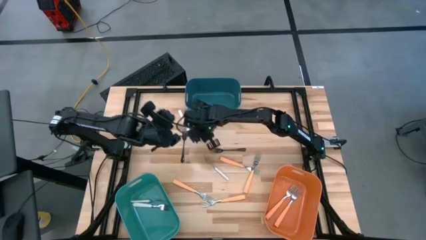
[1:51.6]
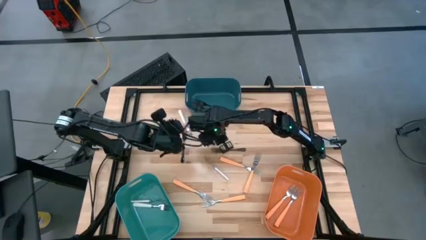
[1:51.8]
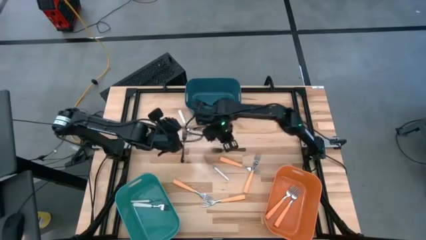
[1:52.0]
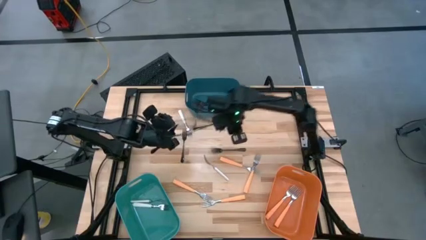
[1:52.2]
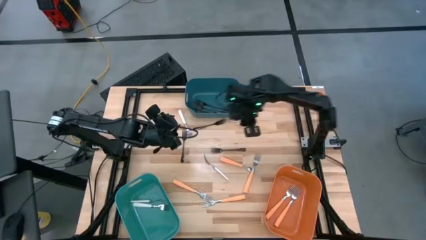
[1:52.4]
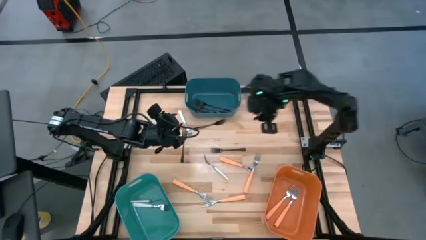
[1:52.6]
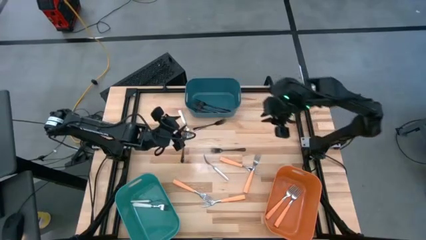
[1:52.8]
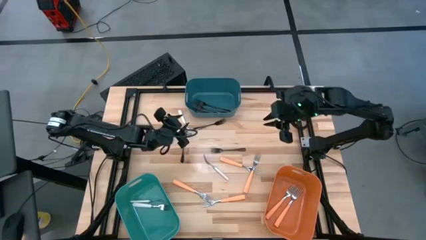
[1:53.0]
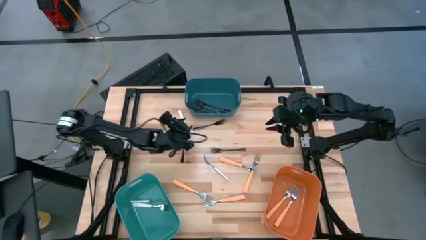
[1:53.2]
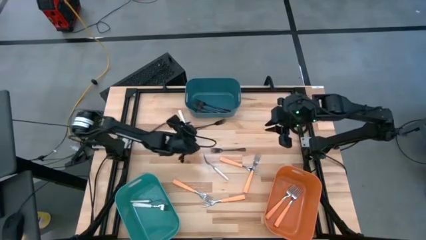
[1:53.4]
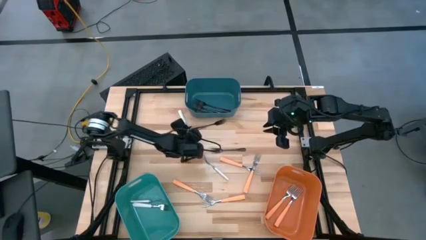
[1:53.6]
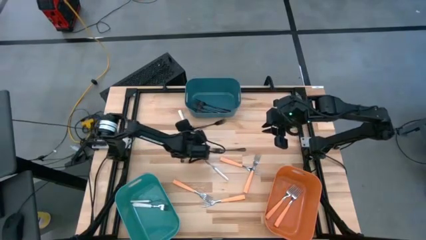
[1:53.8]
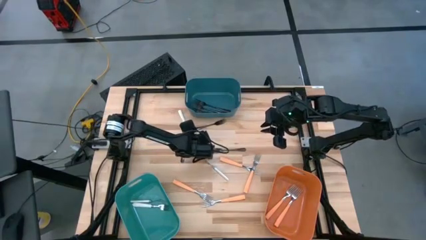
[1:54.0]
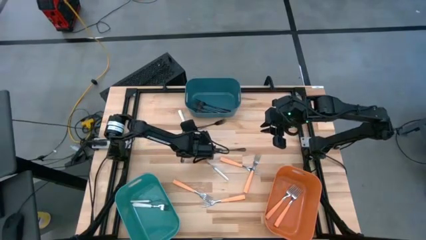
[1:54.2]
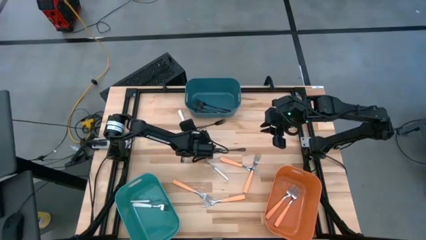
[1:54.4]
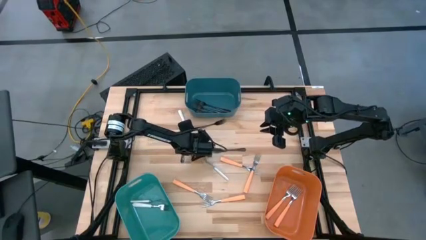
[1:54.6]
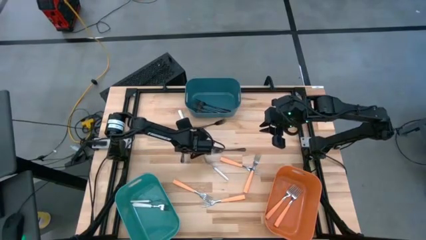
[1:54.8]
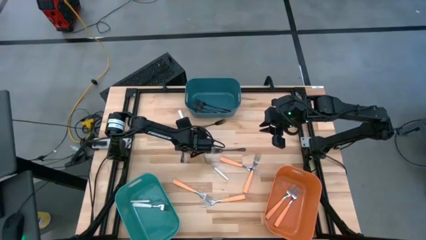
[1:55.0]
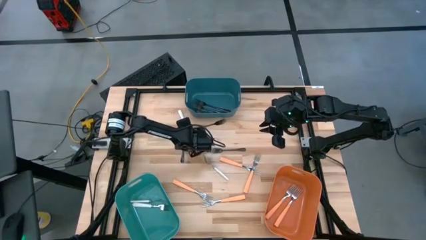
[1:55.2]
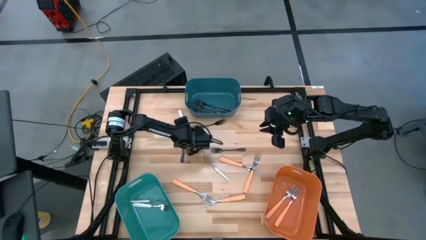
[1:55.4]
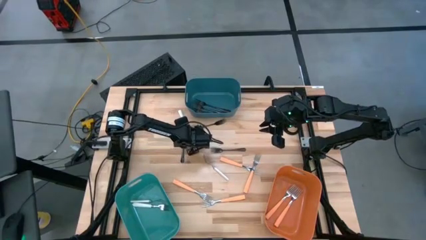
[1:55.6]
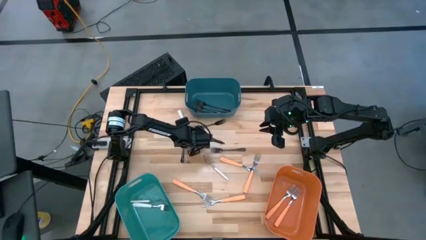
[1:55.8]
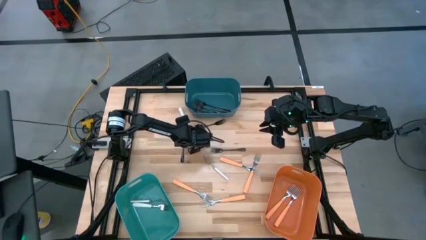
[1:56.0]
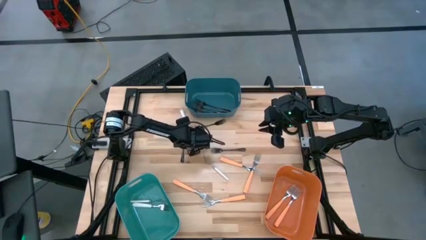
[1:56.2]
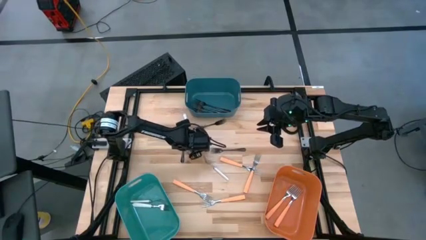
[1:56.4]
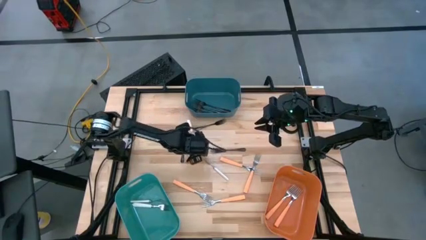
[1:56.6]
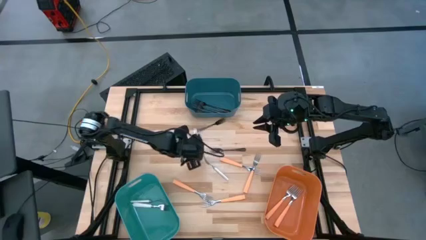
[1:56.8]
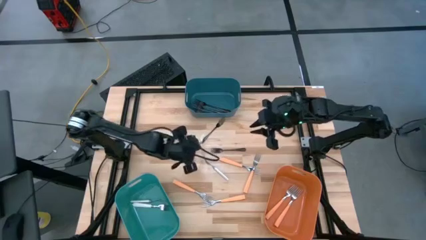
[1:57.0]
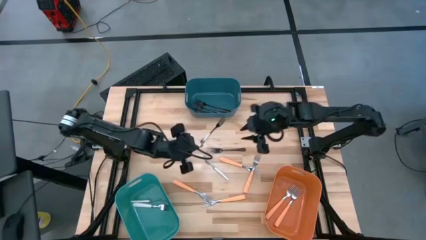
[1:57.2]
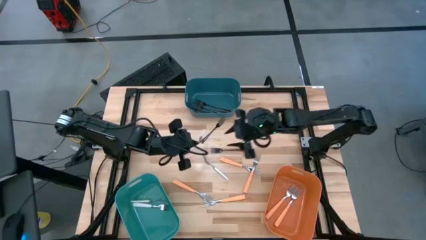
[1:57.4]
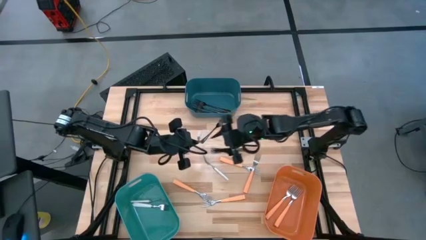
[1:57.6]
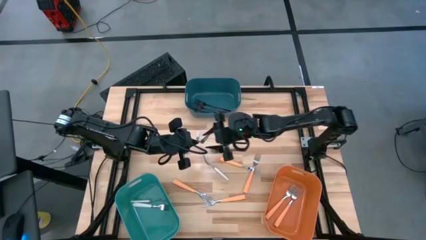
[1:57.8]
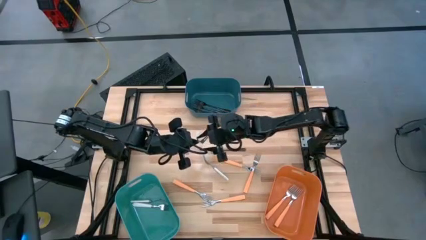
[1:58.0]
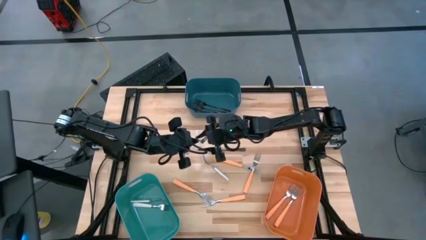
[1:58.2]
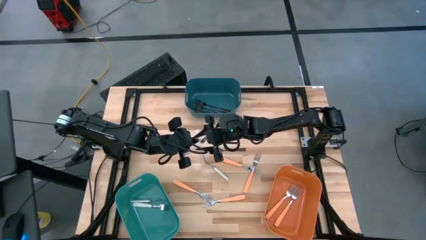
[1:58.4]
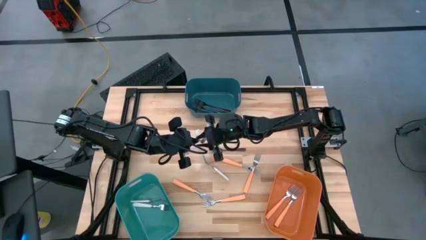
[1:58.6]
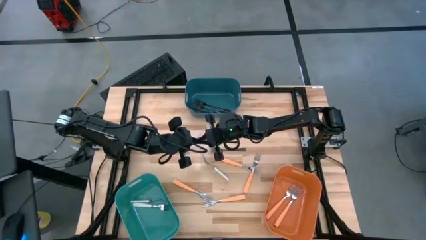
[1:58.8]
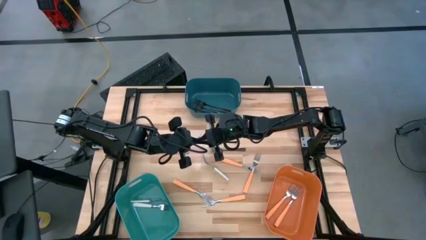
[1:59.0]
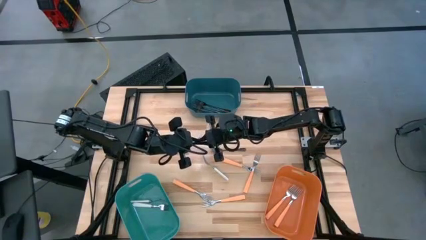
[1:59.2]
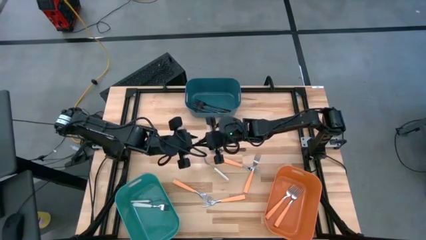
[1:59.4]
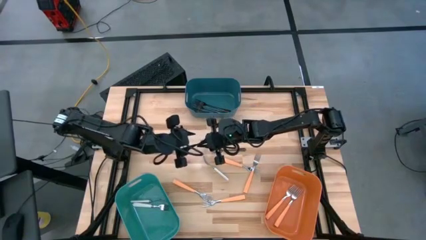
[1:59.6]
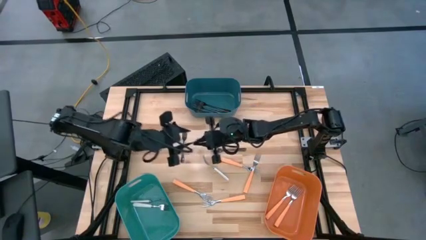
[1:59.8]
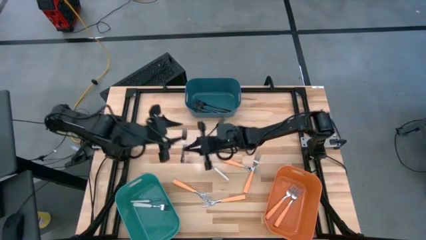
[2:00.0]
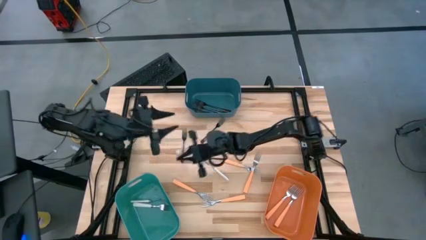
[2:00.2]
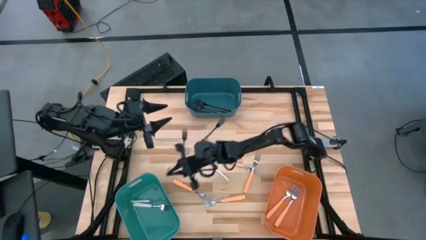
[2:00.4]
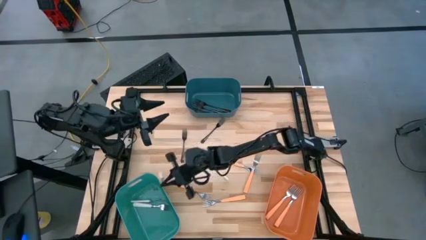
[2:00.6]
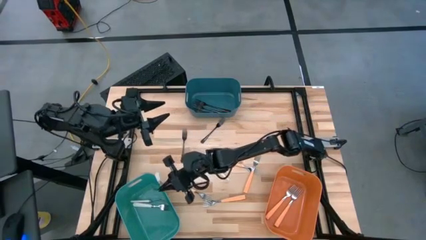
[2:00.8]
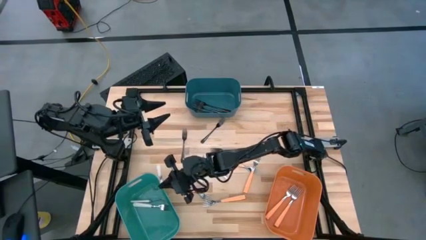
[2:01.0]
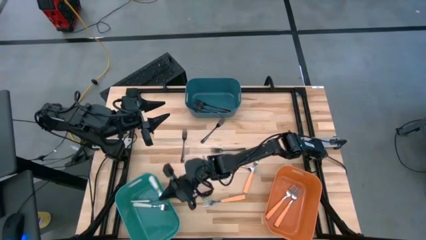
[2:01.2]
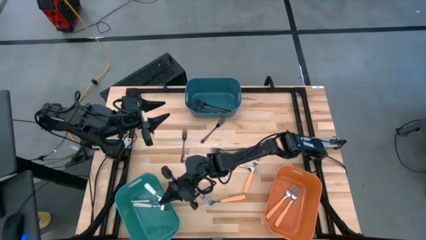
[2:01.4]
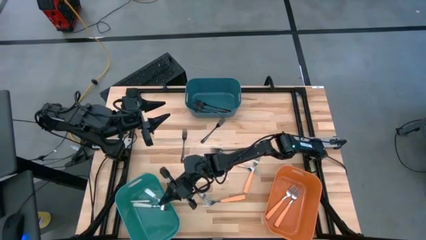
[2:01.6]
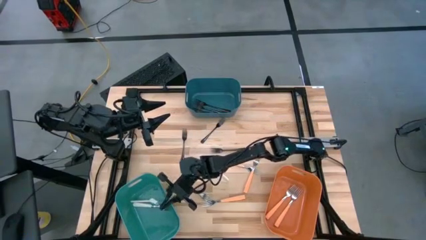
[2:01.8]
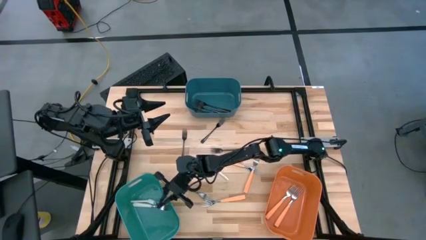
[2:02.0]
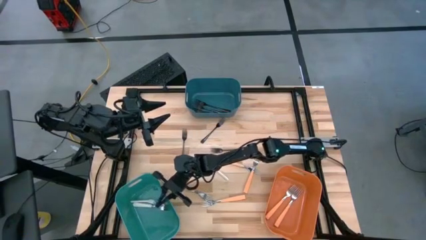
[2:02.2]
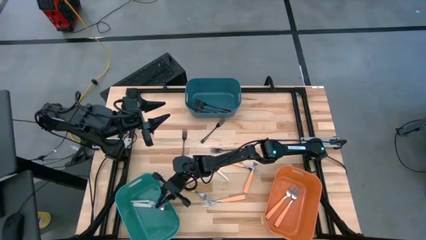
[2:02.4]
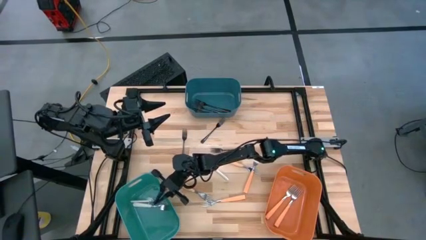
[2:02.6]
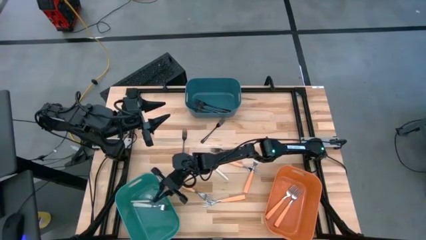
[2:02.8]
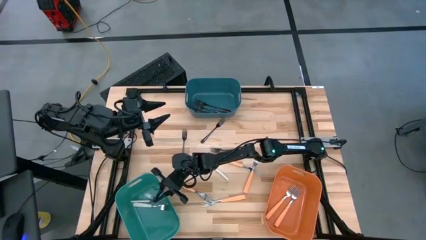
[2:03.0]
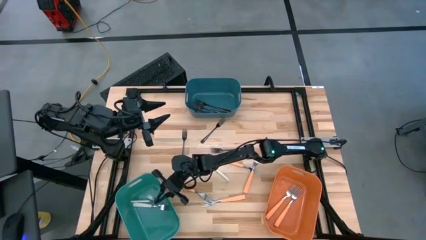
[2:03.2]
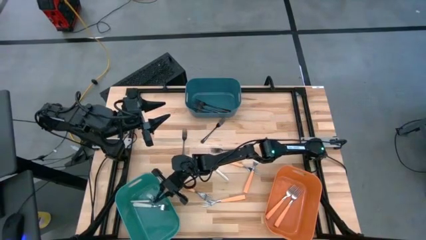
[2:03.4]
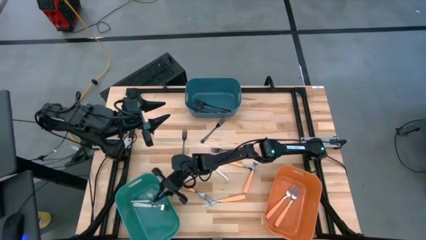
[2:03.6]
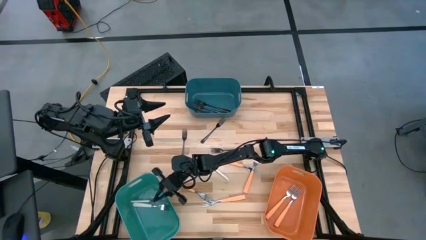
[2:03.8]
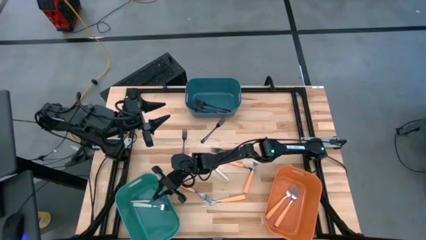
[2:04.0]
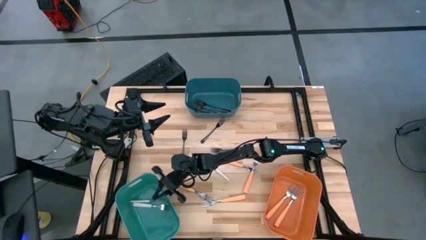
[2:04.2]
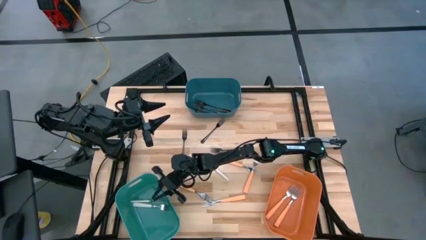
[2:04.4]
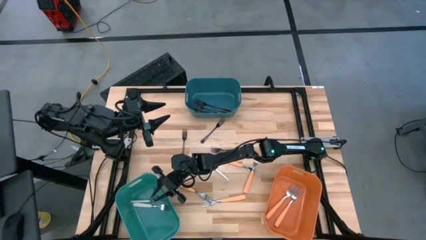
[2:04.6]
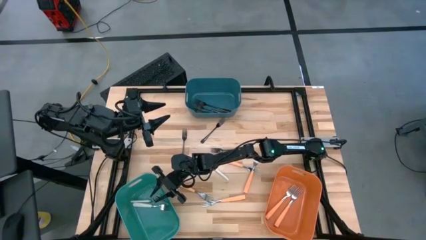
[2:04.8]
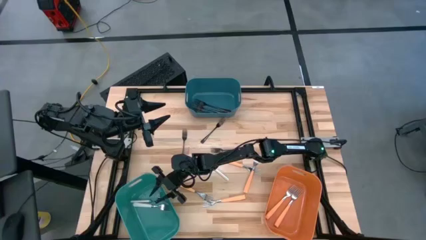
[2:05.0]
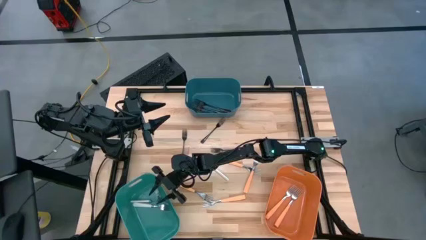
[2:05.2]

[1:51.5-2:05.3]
Task: Sort silverware by color (type)
Put the white fork into the green blue bin
